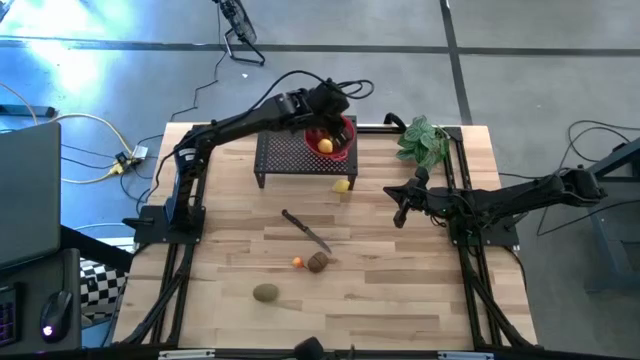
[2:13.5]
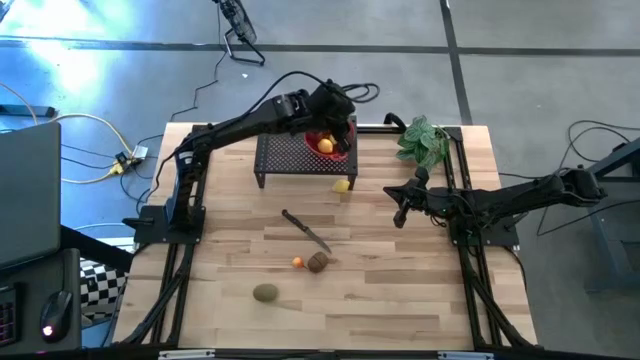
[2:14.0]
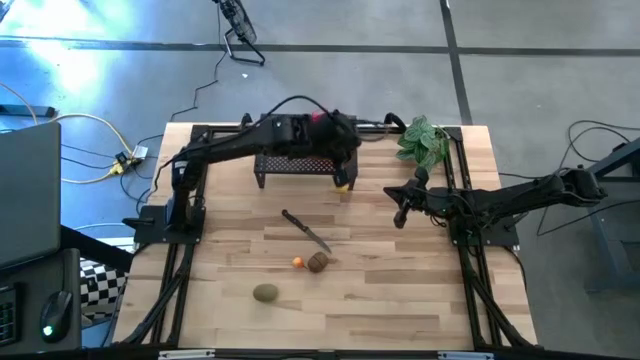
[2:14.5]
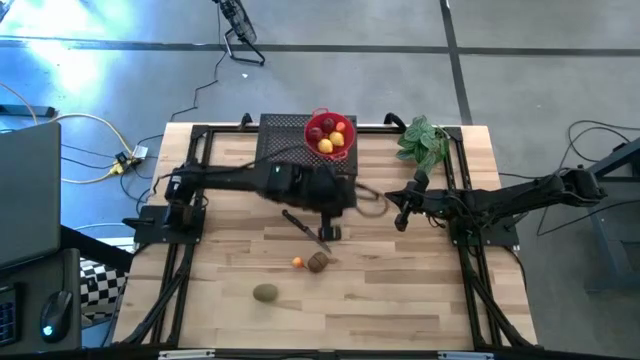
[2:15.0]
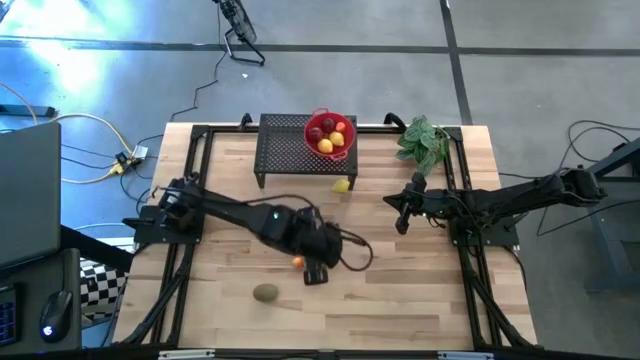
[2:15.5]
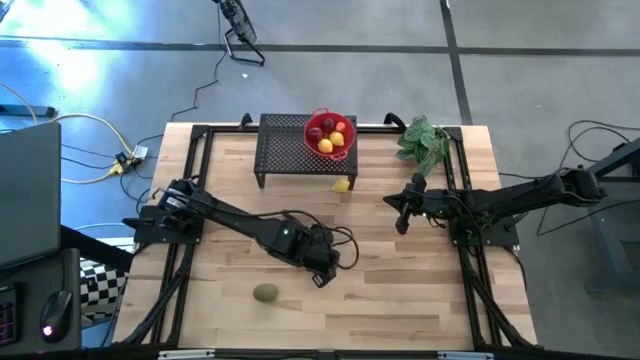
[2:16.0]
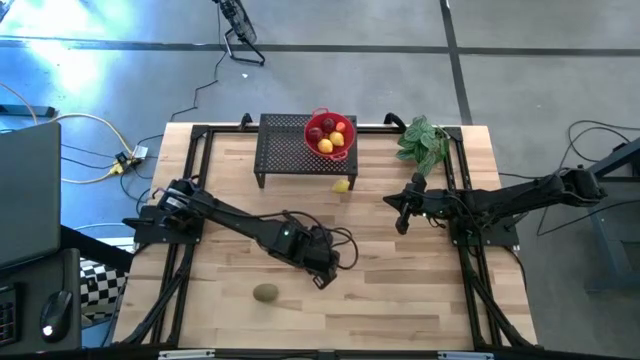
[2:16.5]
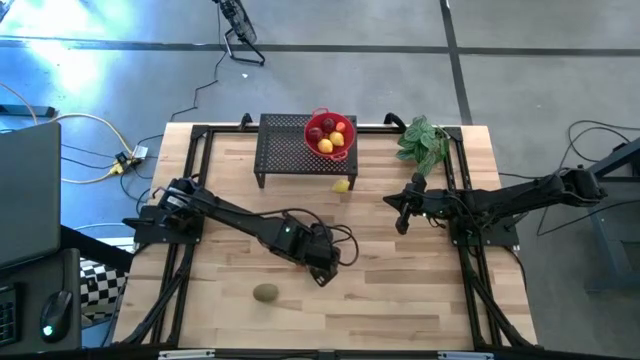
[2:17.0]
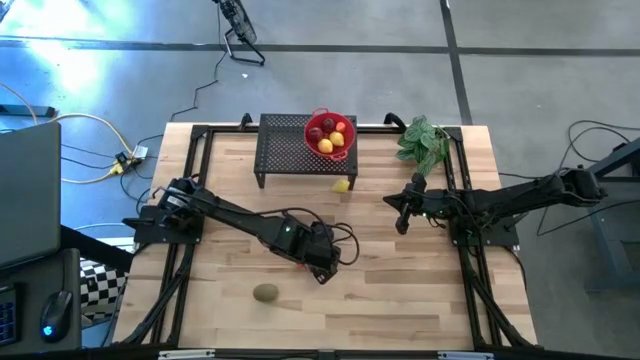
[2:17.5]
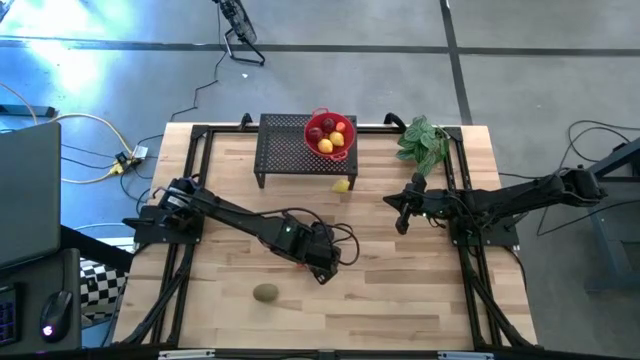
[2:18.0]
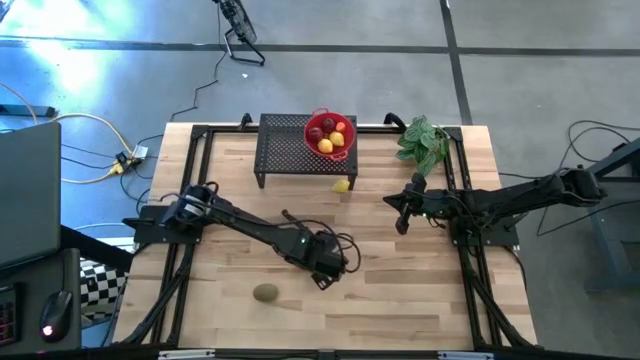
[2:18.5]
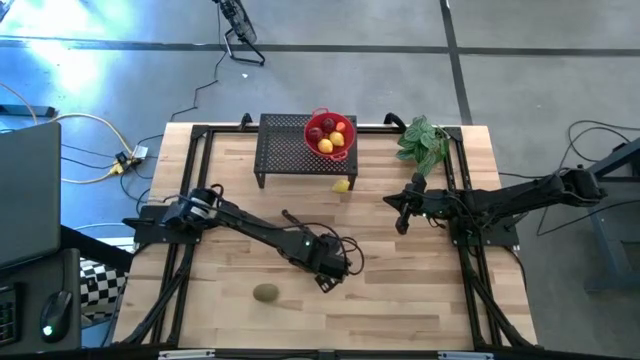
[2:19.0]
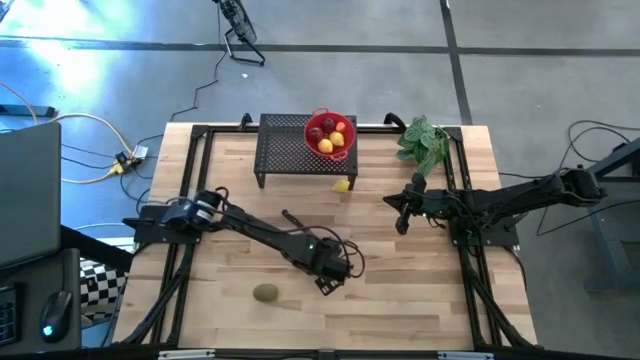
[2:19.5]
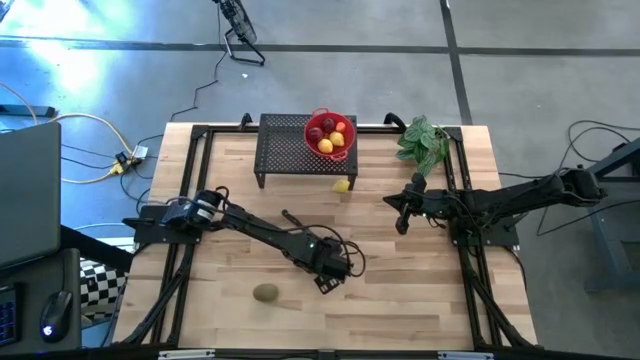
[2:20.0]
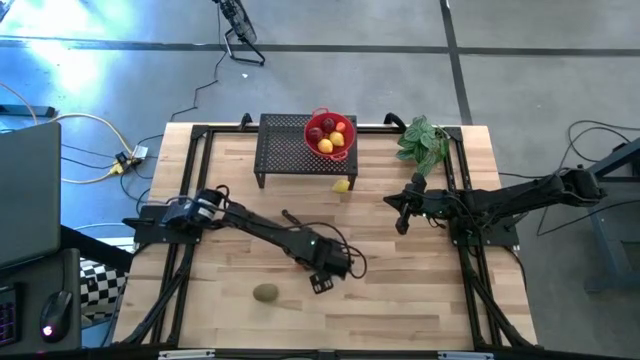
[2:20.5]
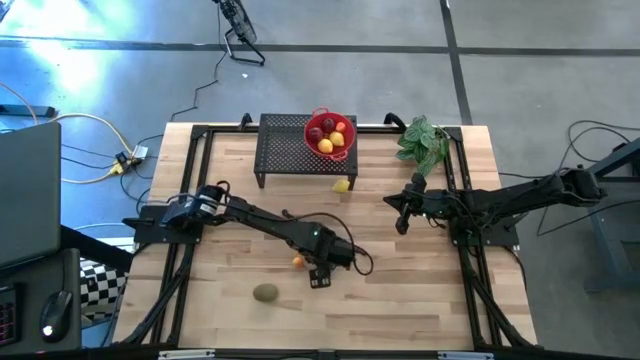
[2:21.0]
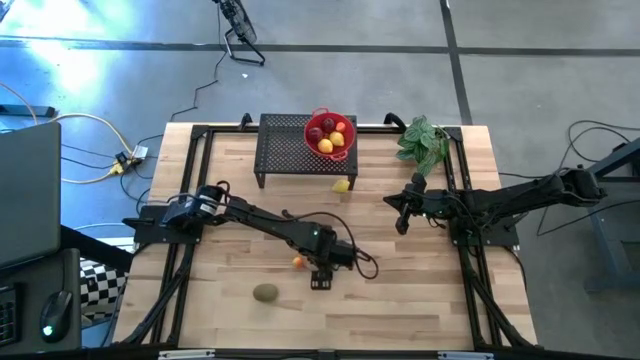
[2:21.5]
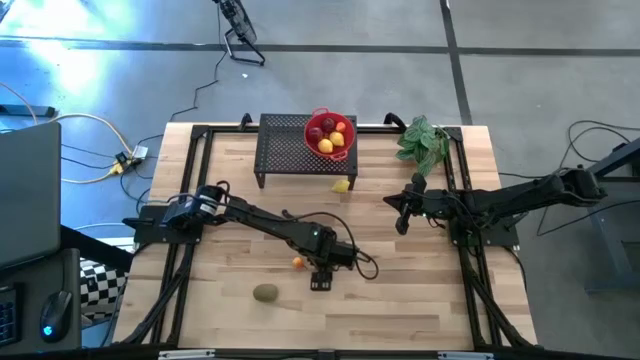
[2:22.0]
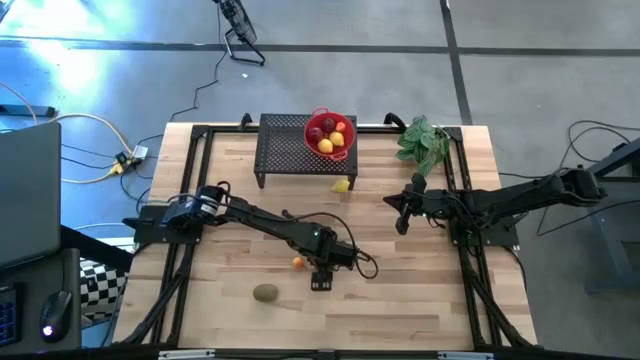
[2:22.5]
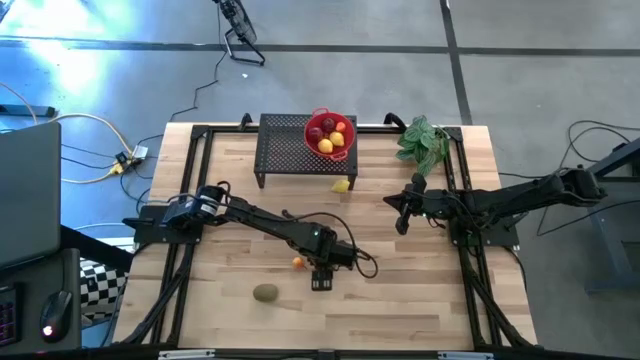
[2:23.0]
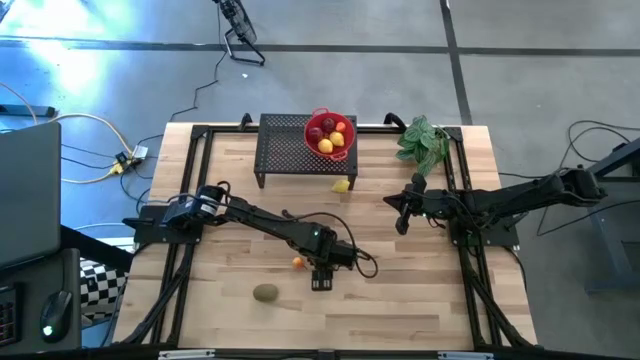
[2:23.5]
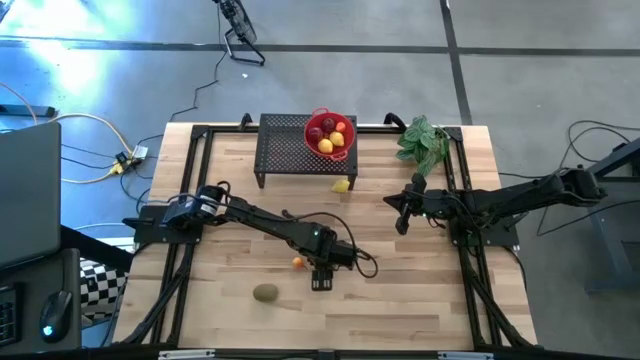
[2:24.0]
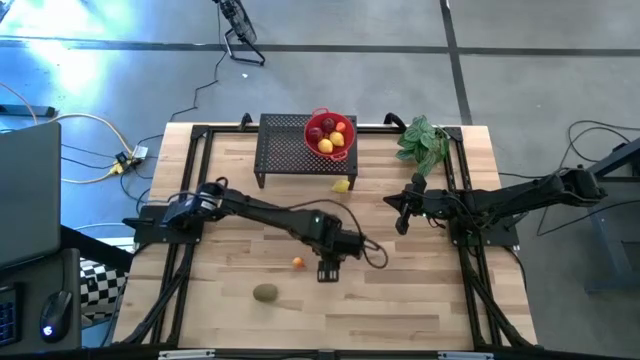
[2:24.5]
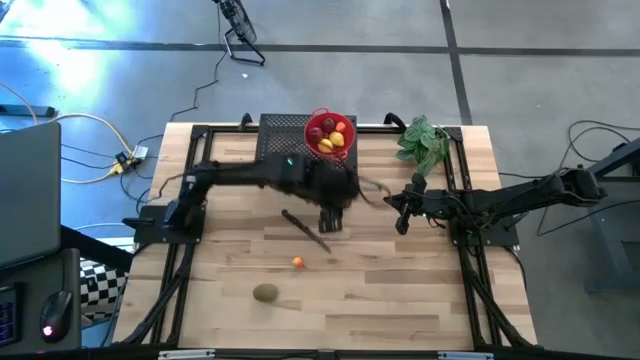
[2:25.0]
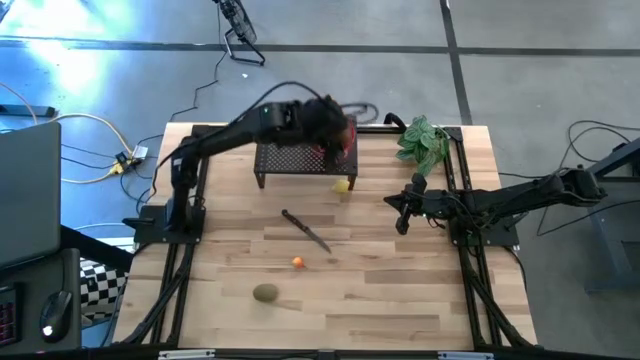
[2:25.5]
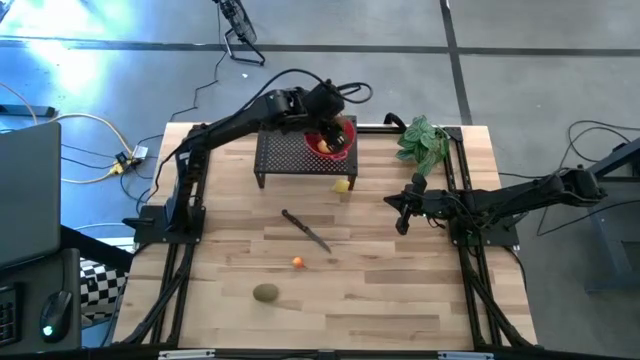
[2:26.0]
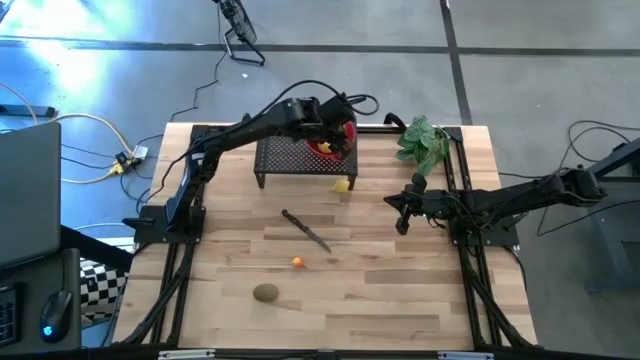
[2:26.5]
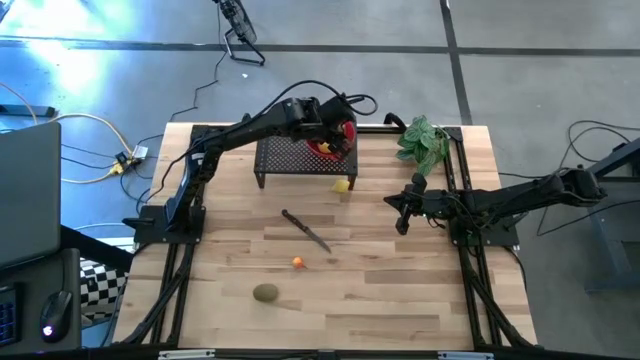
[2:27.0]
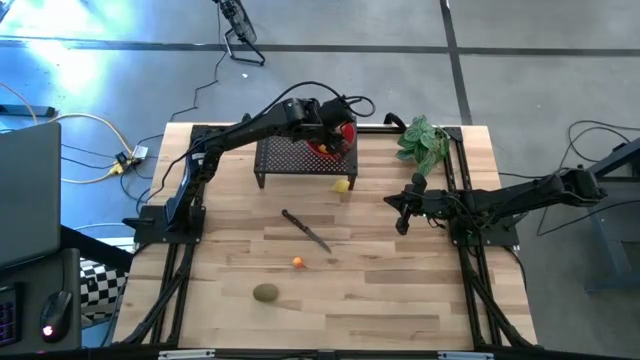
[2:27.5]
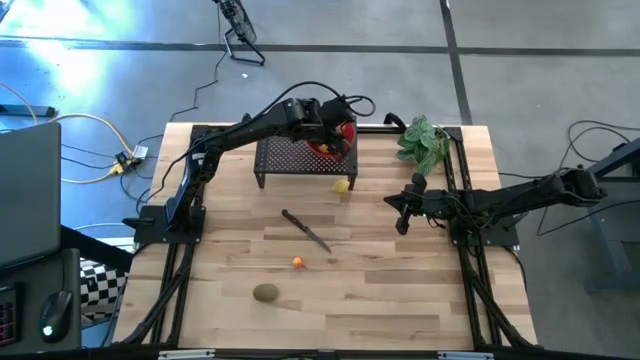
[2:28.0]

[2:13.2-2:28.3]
Task: Pick & Place Fruit
Put the right kiwi into the colander on the shelf

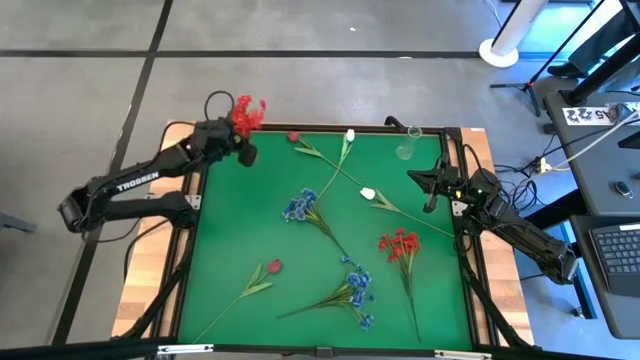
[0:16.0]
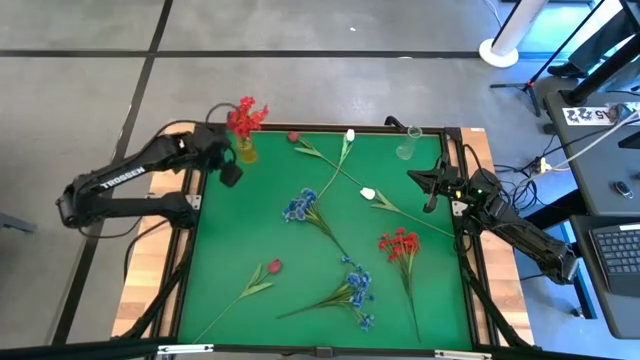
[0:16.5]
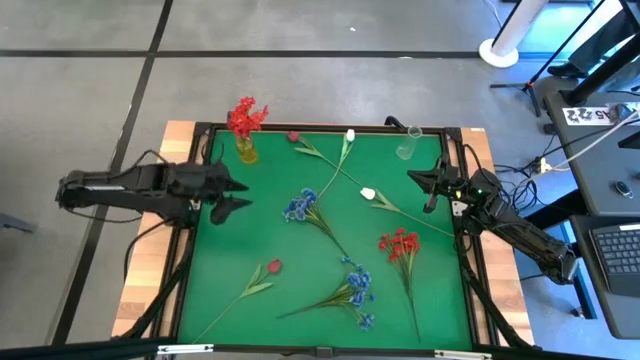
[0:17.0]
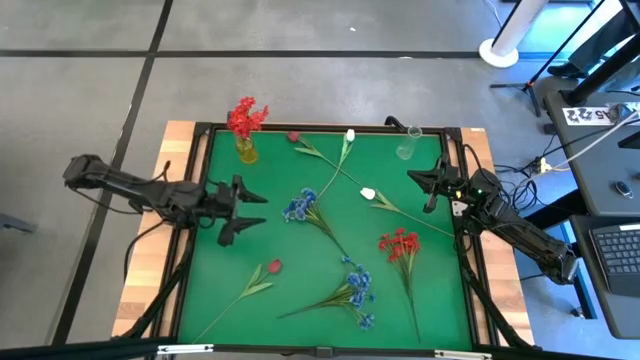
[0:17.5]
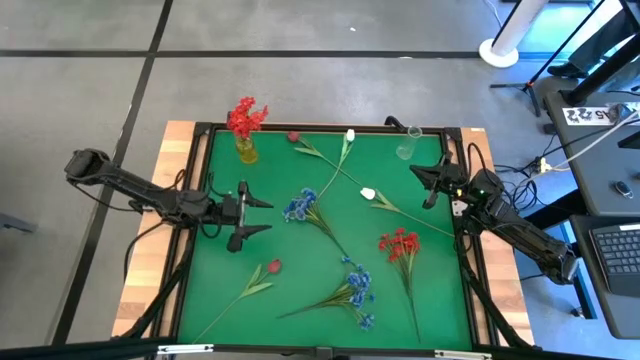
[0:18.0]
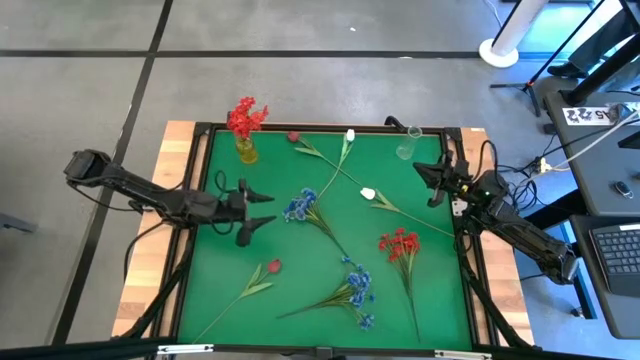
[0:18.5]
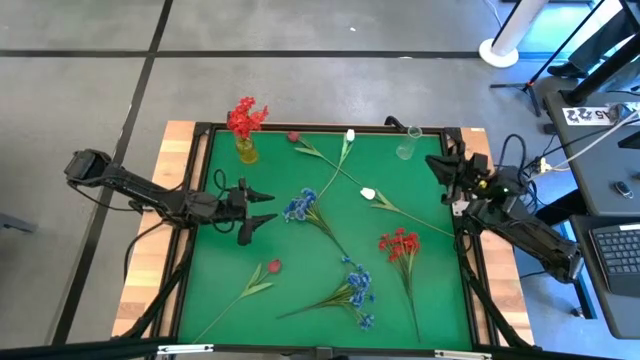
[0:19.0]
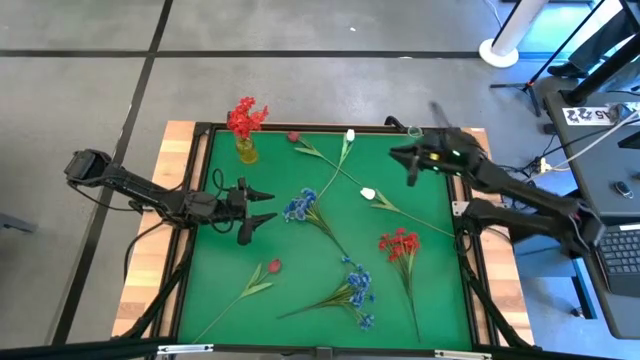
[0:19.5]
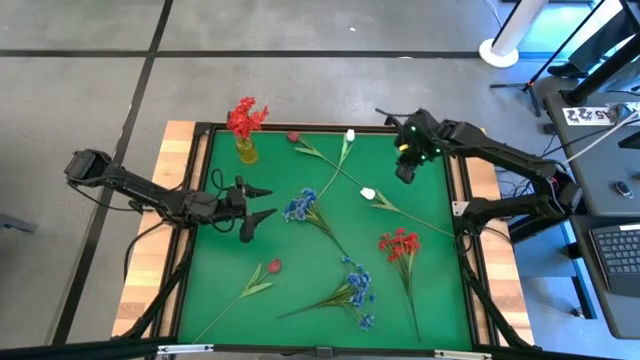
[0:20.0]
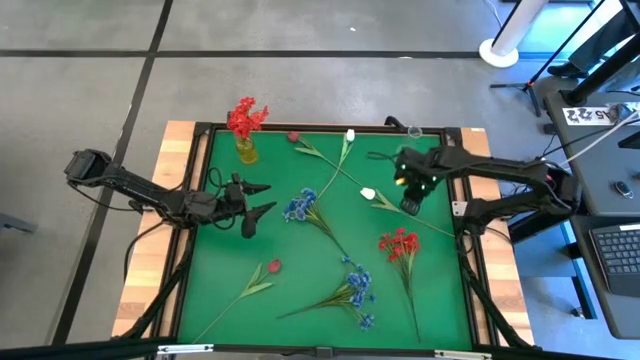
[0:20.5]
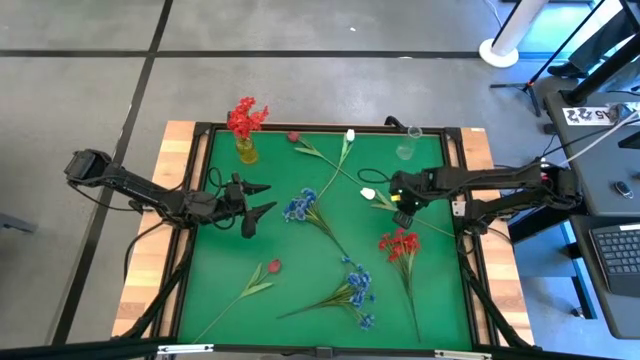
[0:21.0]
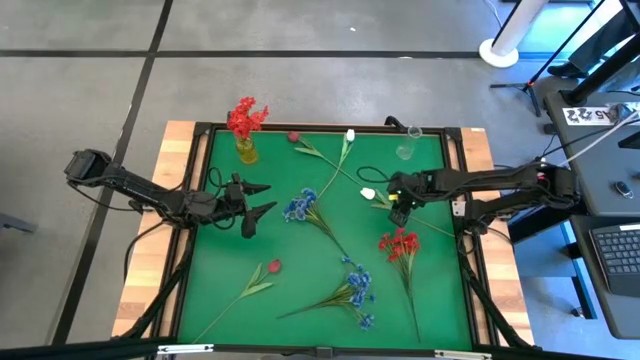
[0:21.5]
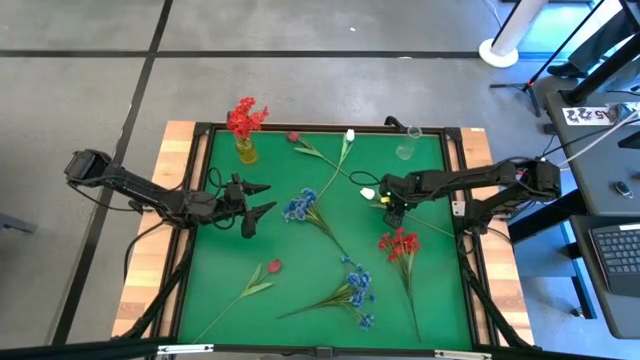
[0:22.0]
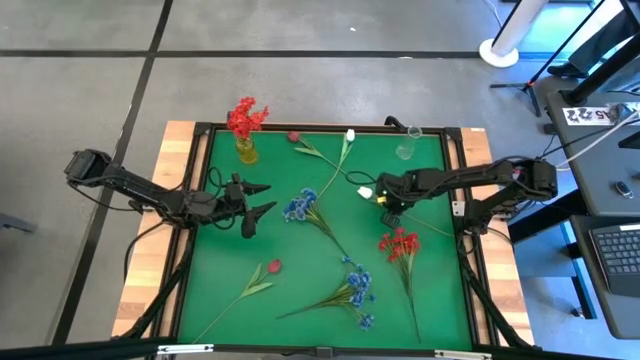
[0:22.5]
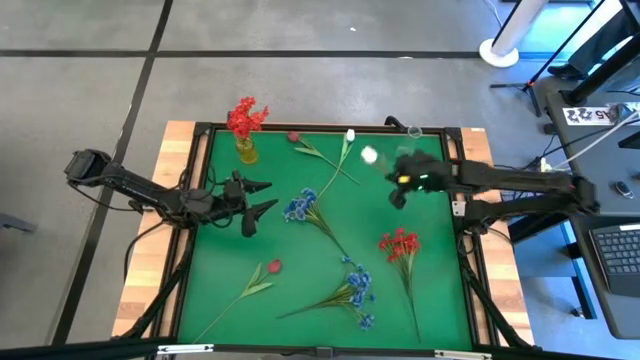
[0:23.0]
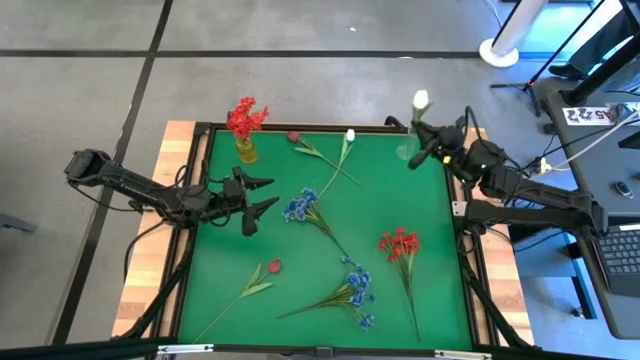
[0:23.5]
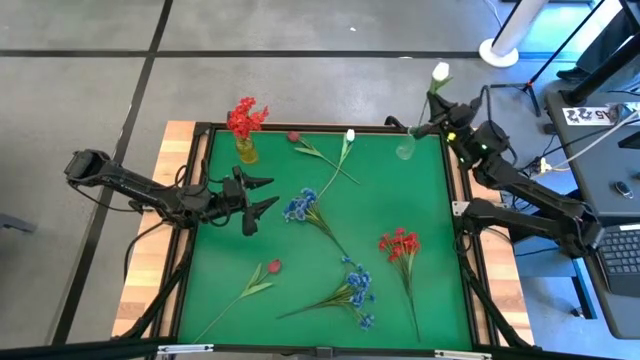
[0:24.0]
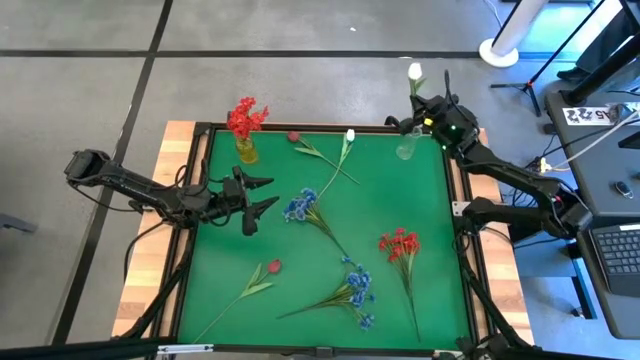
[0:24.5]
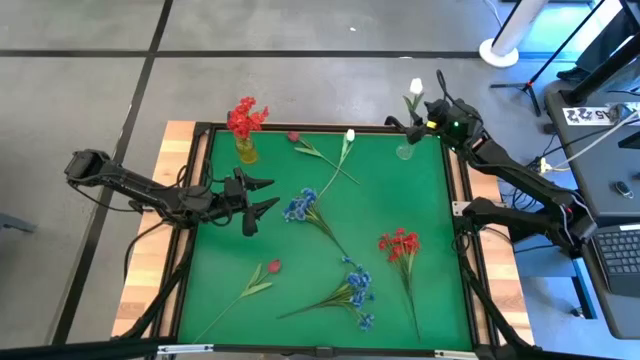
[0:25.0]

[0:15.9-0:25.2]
Task: Sort flowers into vase by color
Put the right white flower into the transparent vase
